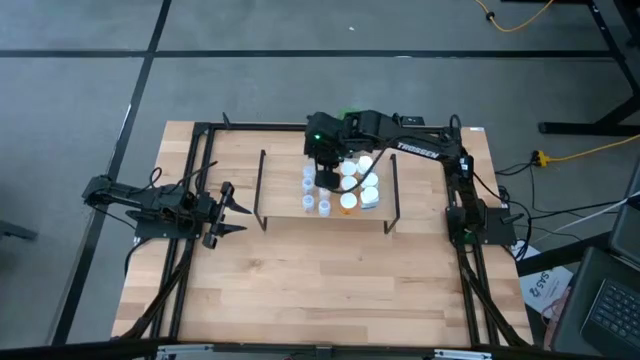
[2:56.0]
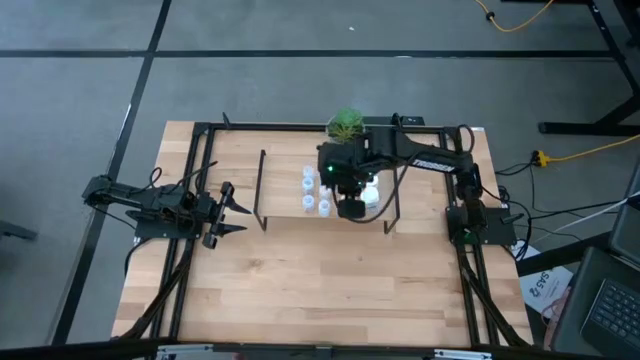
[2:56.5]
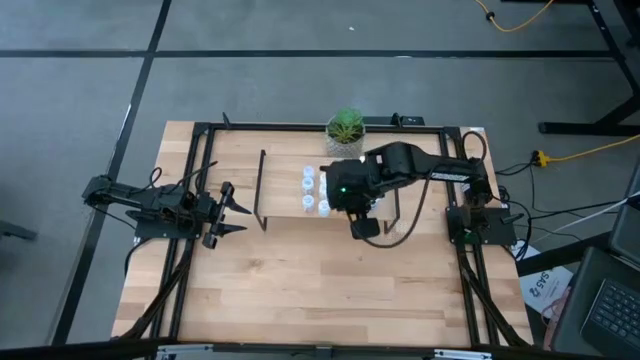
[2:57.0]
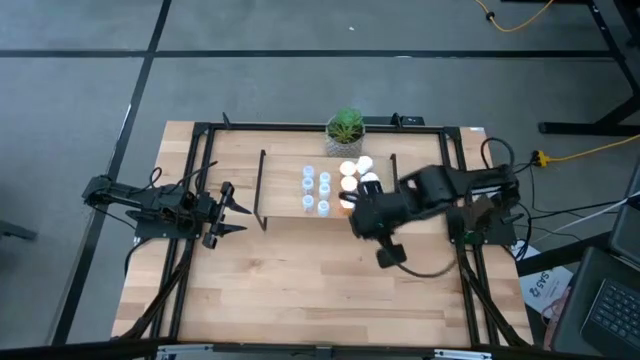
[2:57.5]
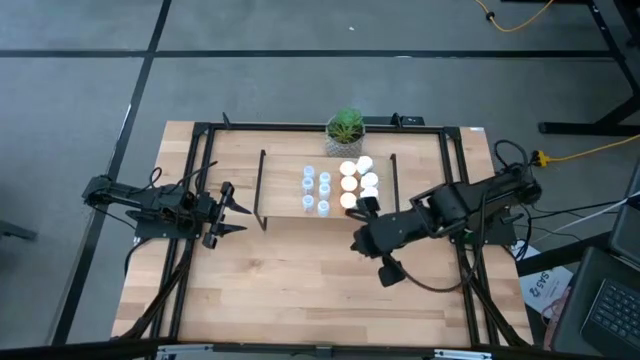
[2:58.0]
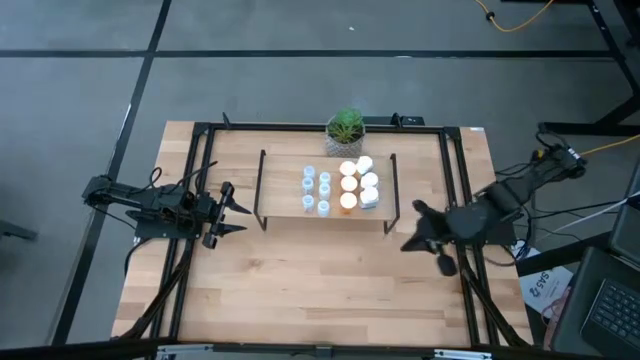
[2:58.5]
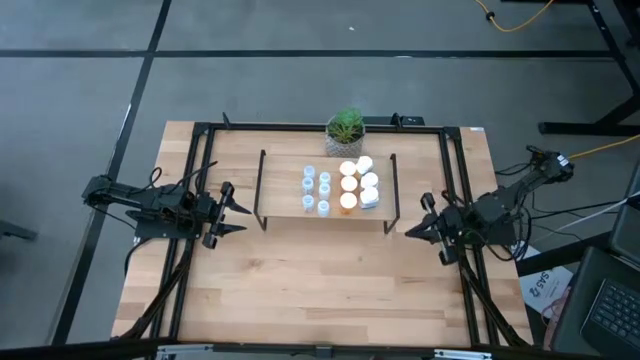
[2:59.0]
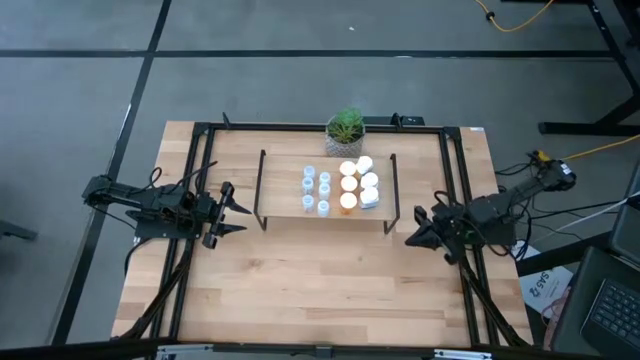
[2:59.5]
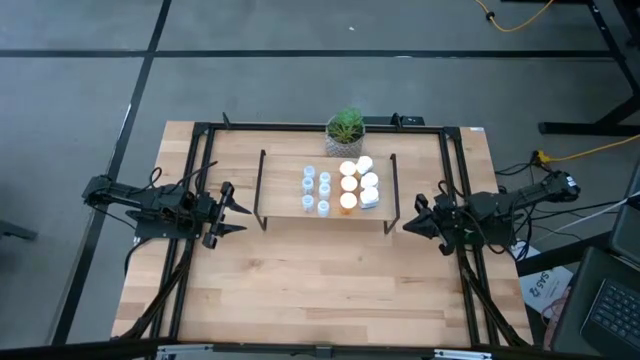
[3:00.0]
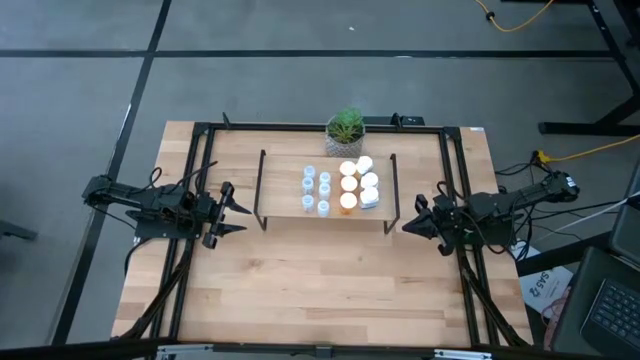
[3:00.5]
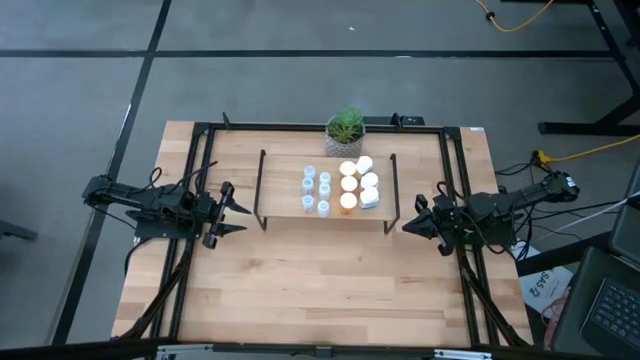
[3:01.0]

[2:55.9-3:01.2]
Task: Pick and place medicine bottles onto shelf by color
Return to Home Position

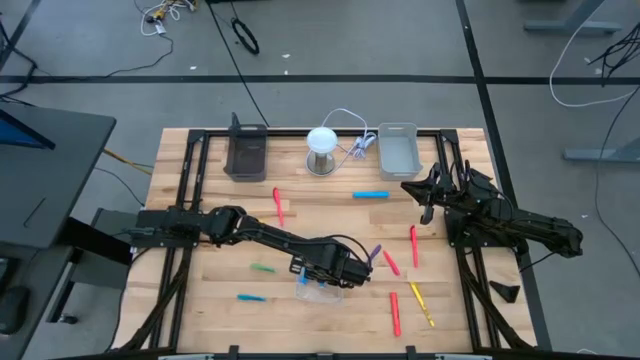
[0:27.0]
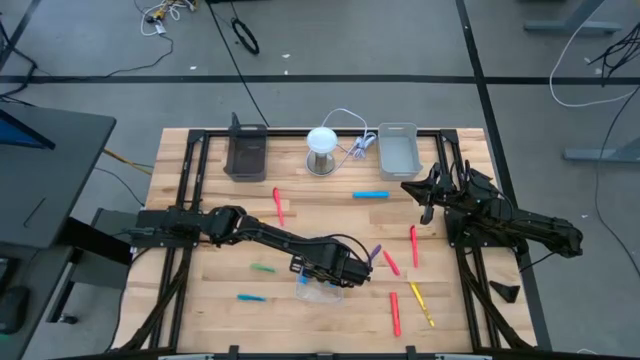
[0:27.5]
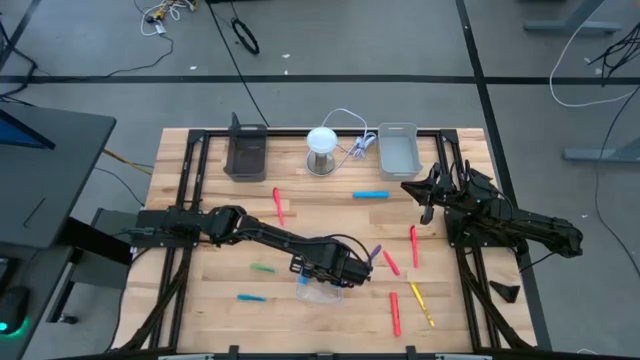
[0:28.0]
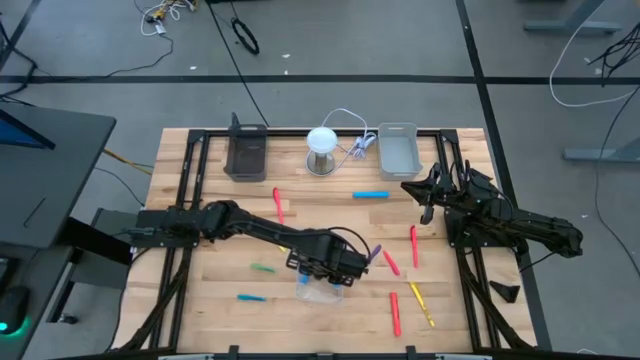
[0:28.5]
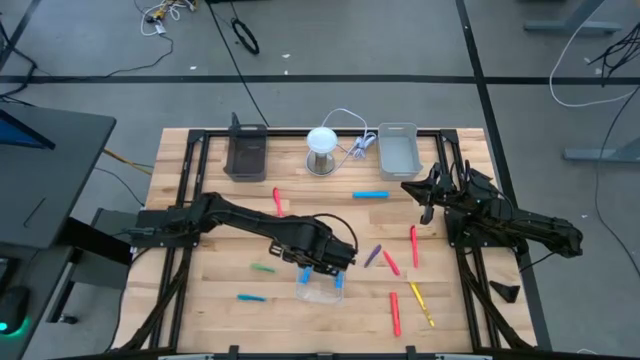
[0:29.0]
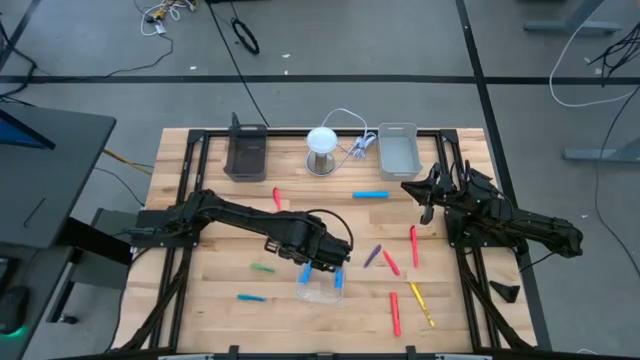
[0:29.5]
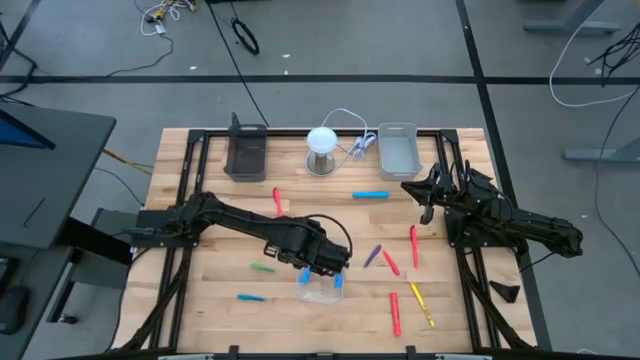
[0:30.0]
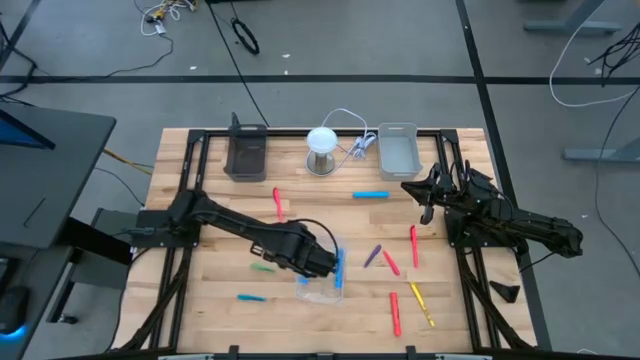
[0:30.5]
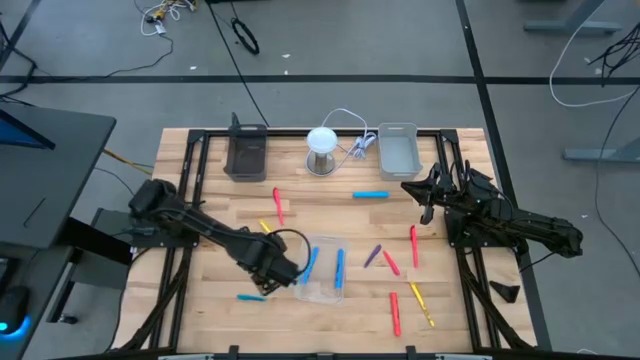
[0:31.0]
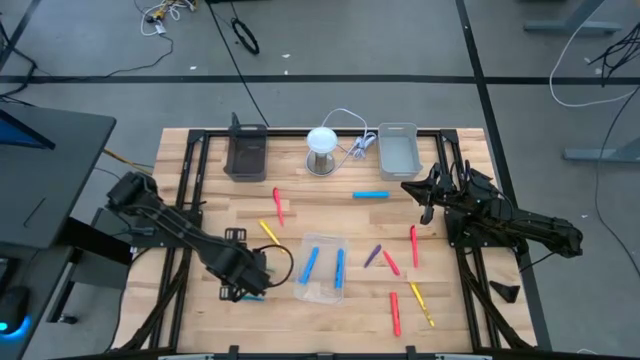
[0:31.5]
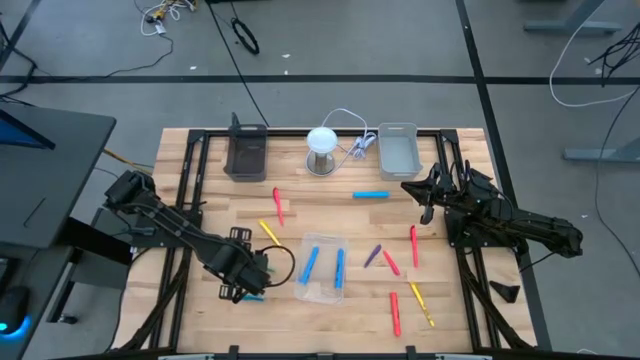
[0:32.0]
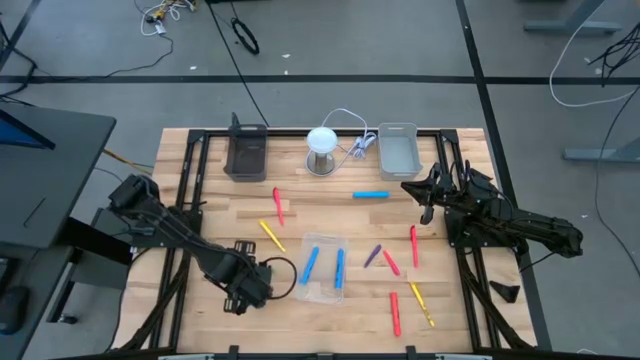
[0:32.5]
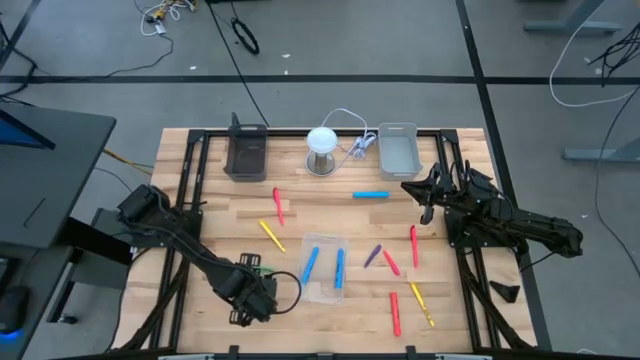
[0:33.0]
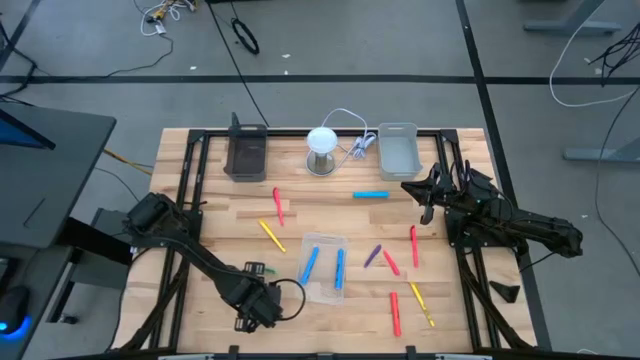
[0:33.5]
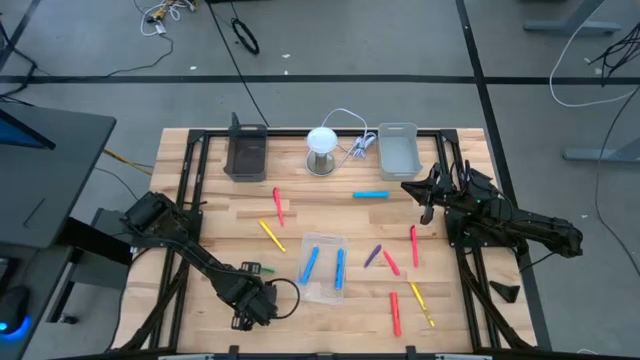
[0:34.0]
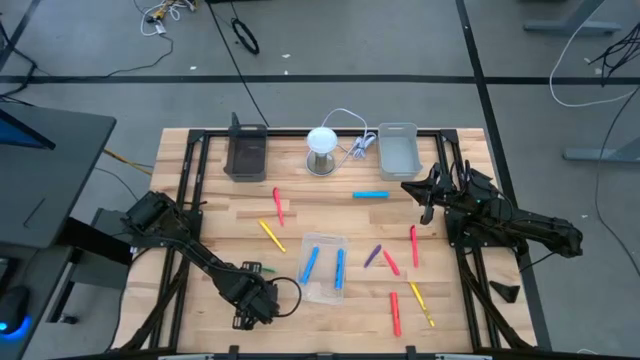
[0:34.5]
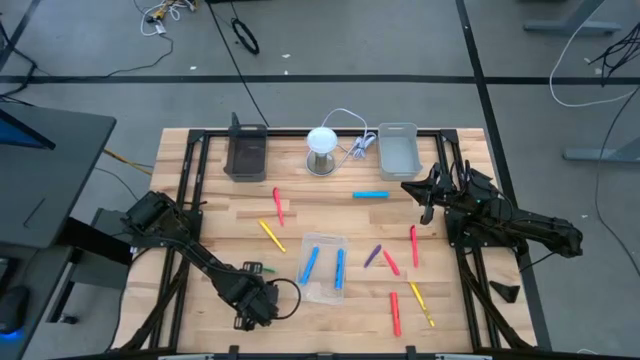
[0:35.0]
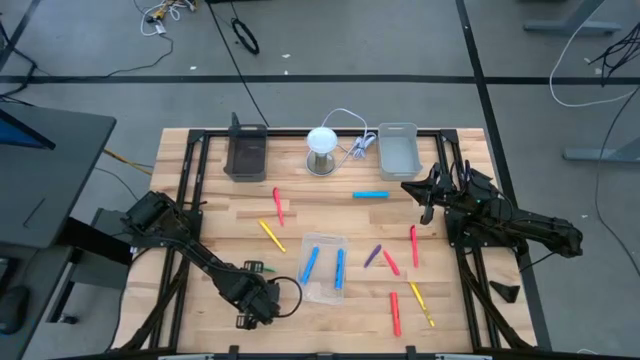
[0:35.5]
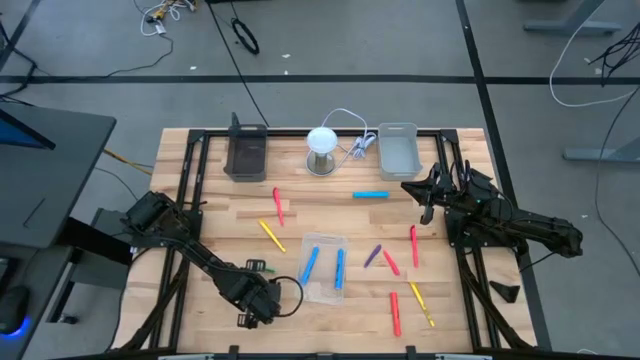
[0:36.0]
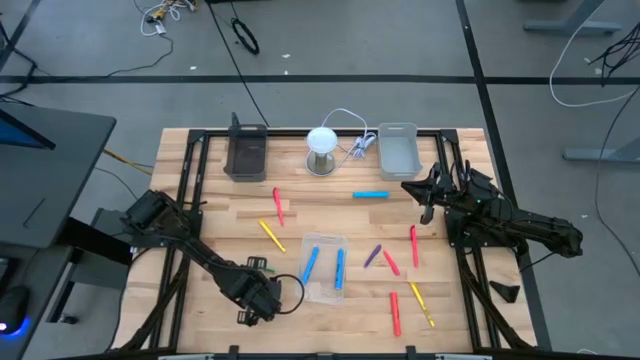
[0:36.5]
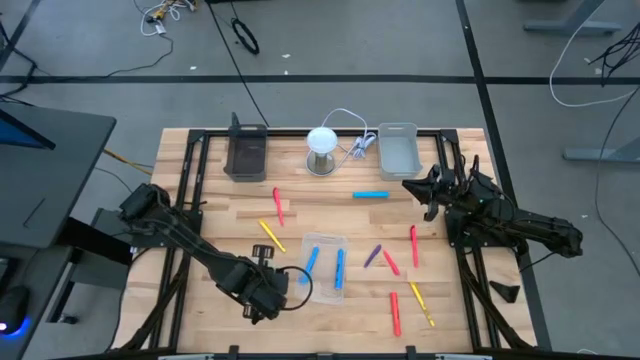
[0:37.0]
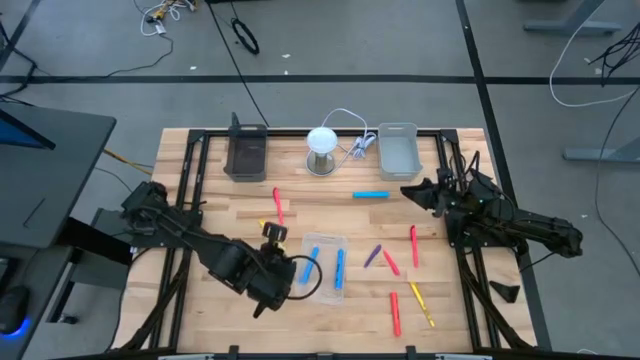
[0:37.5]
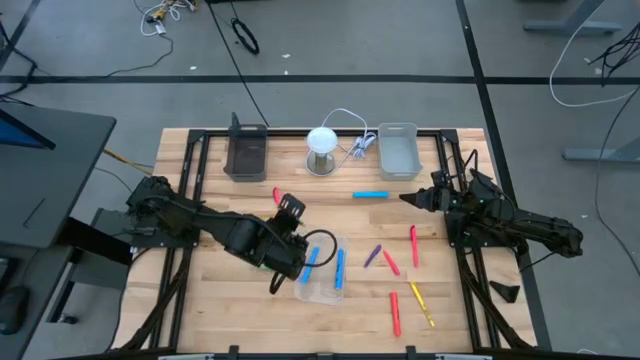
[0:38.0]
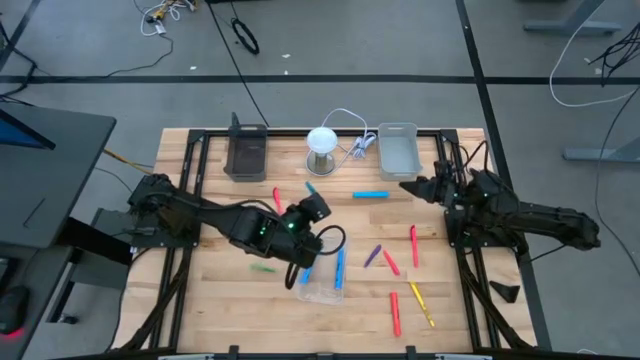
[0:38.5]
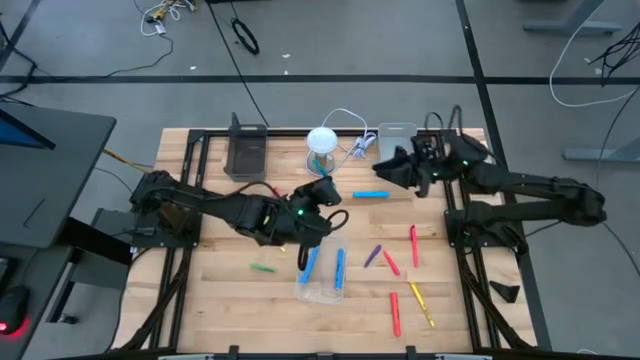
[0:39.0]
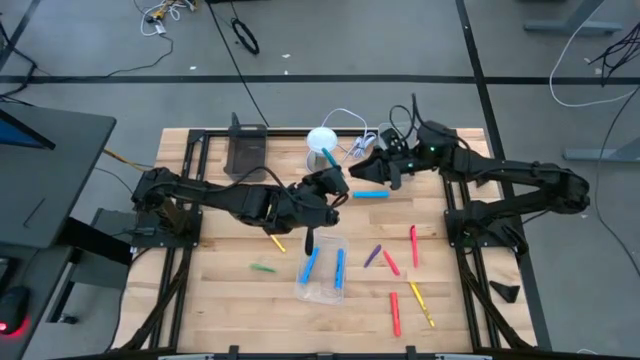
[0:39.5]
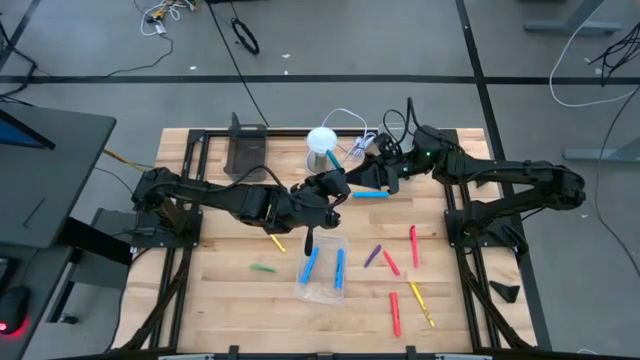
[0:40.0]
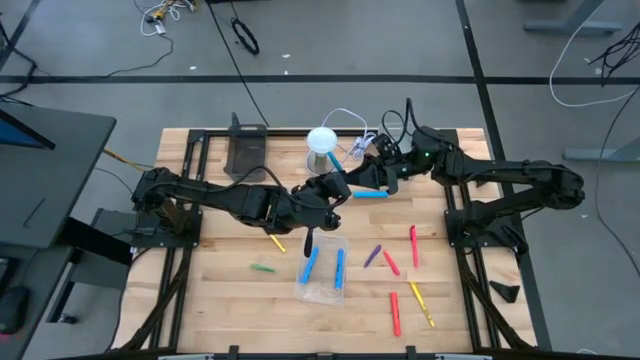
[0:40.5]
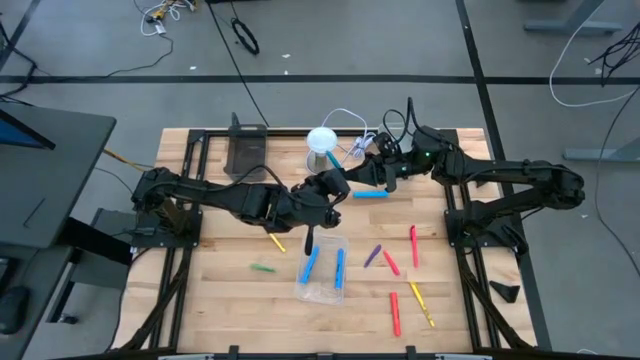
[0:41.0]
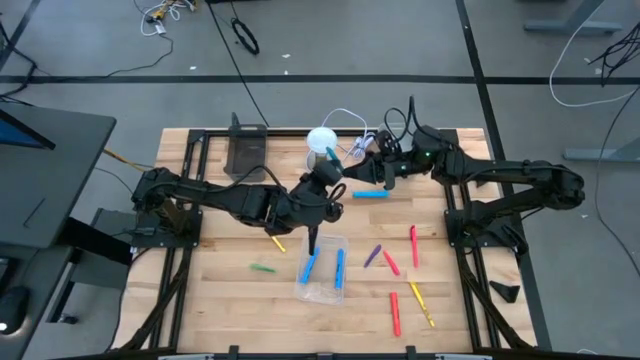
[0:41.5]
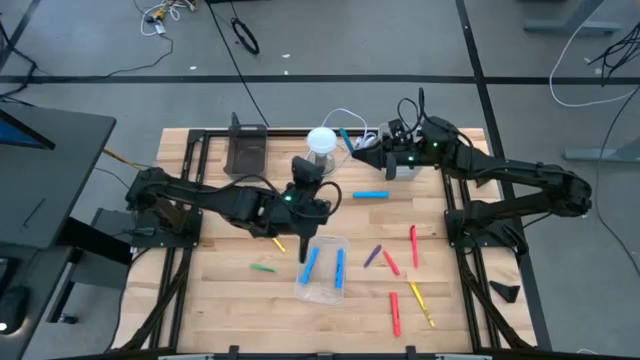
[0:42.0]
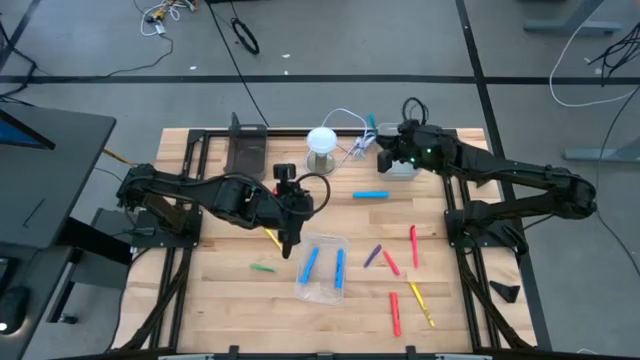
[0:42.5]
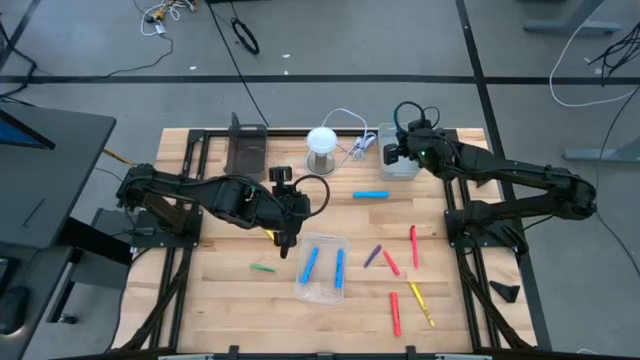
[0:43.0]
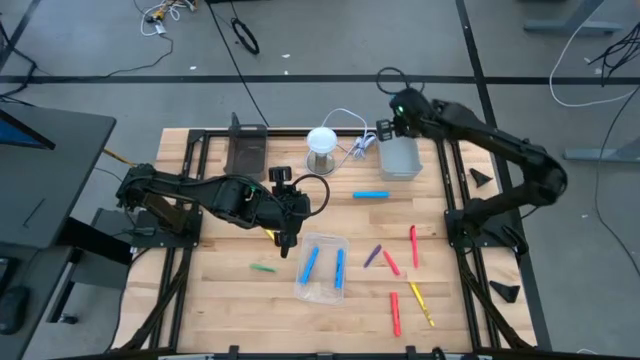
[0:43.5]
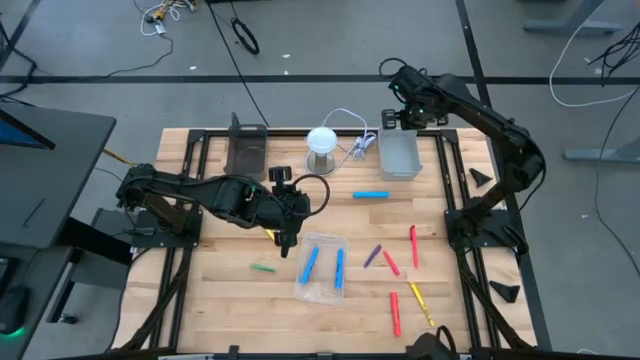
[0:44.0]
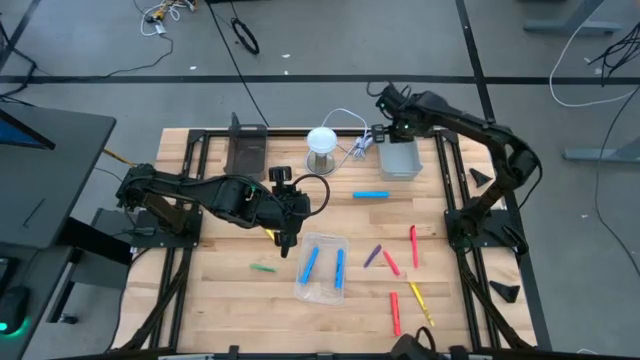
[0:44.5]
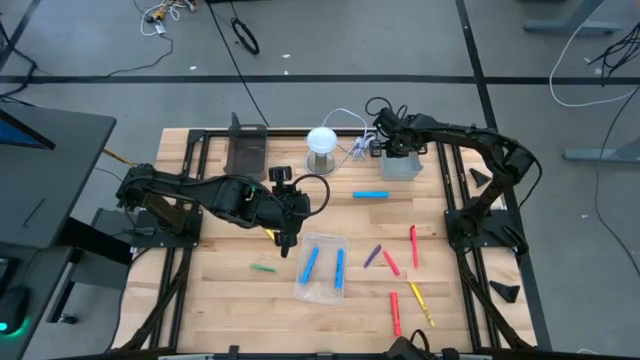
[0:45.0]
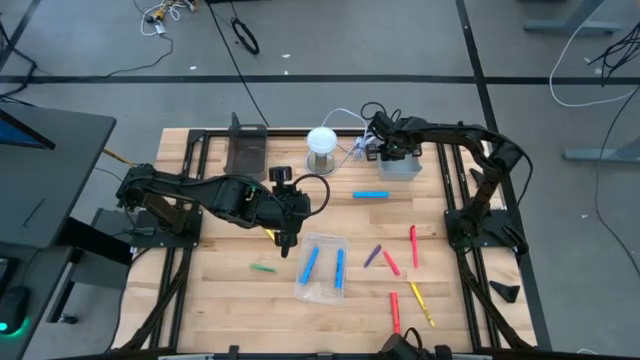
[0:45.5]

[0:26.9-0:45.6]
Task: Pick & Place Markers
Put the blue pen into the gray bin
